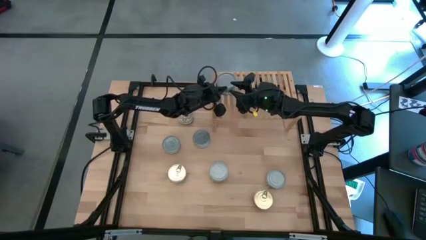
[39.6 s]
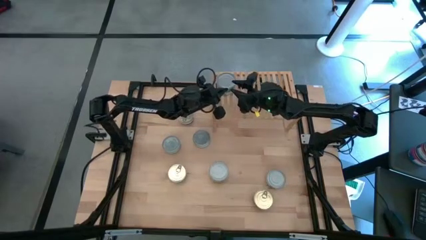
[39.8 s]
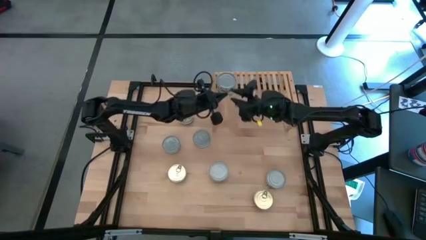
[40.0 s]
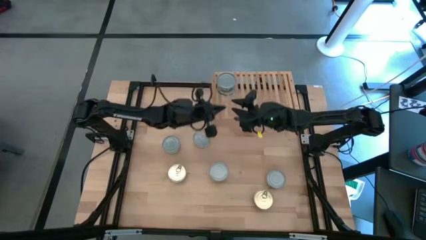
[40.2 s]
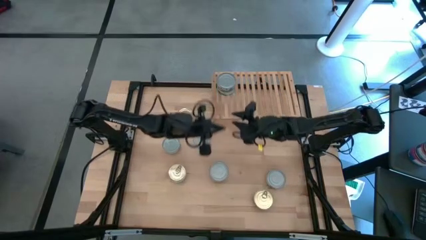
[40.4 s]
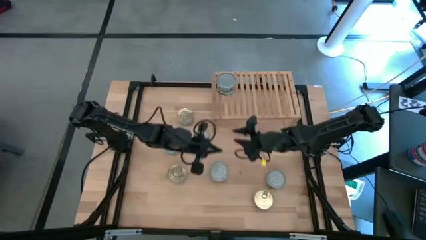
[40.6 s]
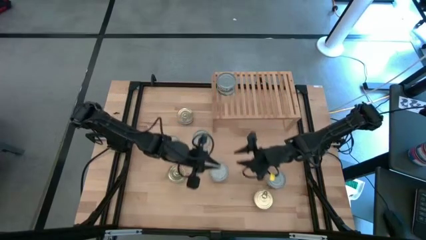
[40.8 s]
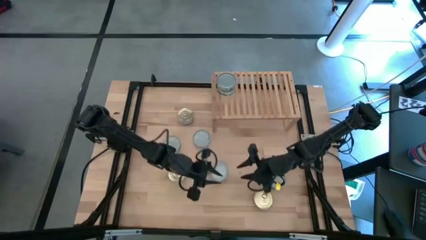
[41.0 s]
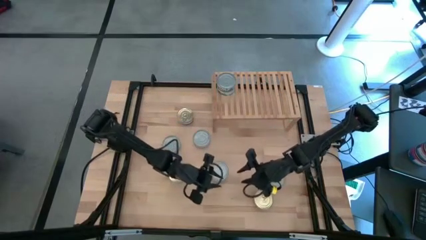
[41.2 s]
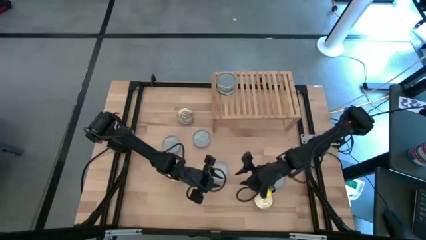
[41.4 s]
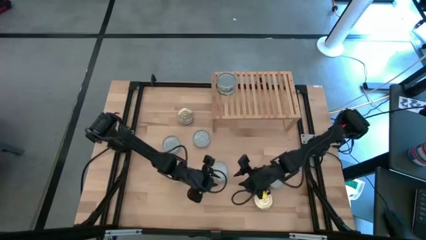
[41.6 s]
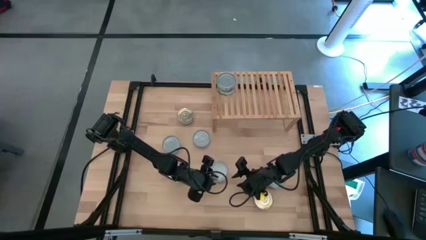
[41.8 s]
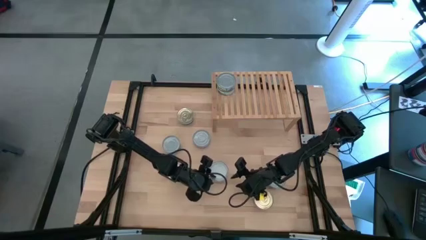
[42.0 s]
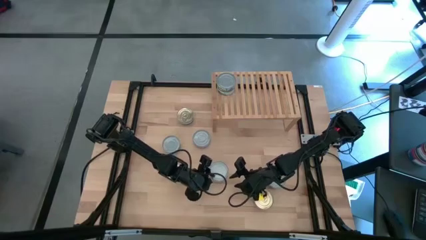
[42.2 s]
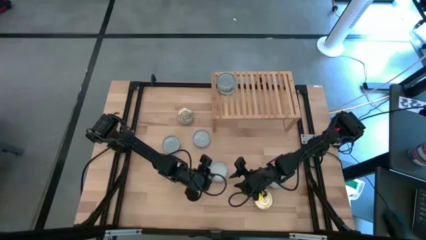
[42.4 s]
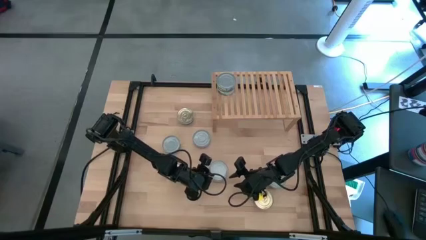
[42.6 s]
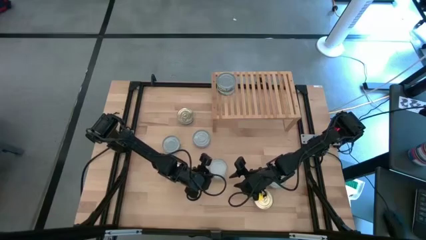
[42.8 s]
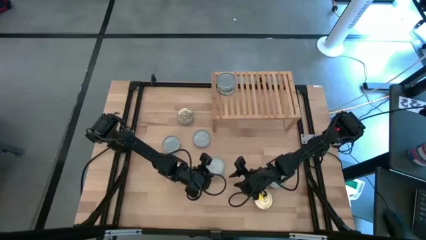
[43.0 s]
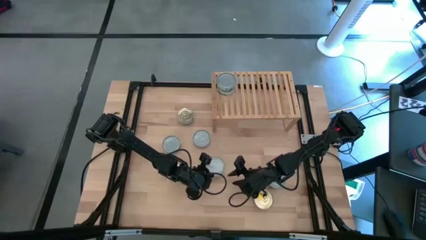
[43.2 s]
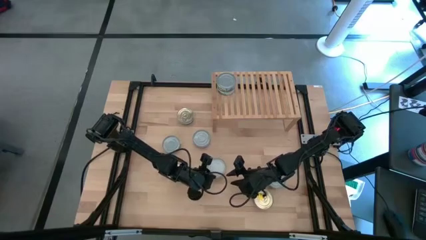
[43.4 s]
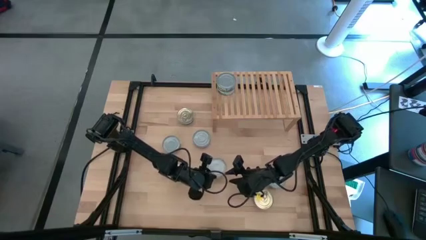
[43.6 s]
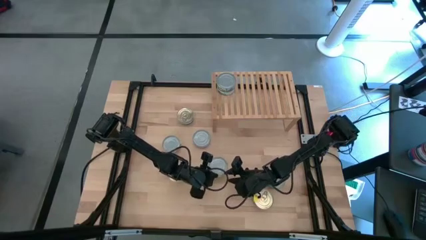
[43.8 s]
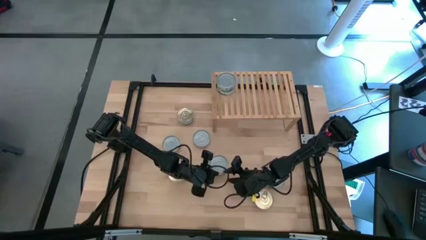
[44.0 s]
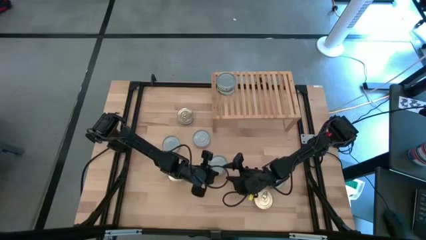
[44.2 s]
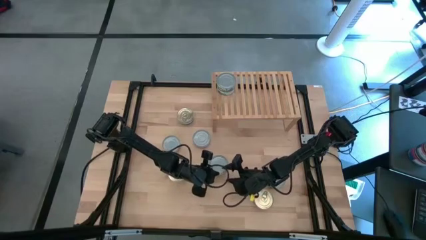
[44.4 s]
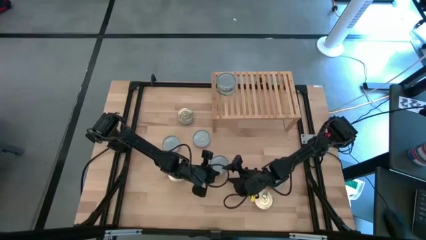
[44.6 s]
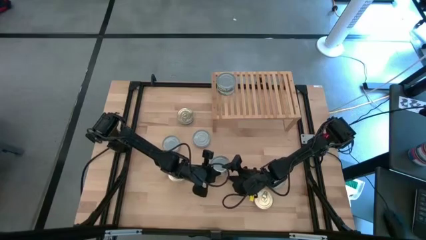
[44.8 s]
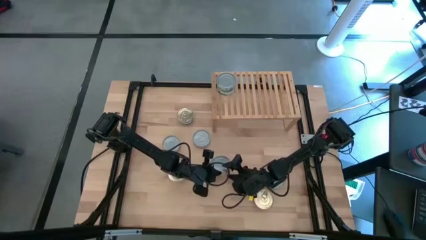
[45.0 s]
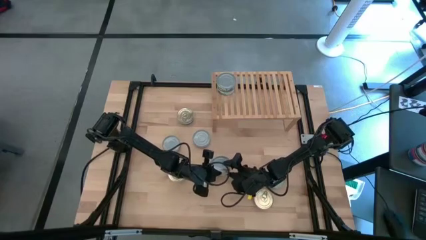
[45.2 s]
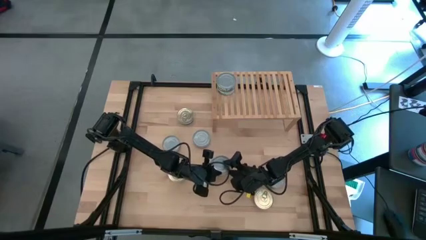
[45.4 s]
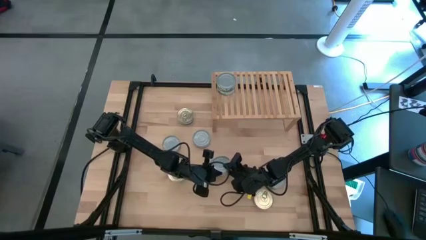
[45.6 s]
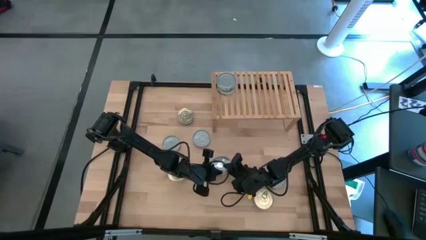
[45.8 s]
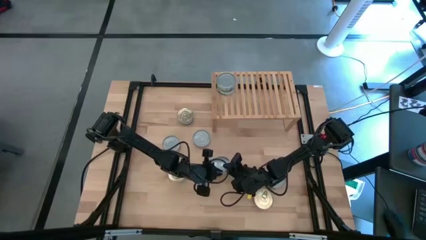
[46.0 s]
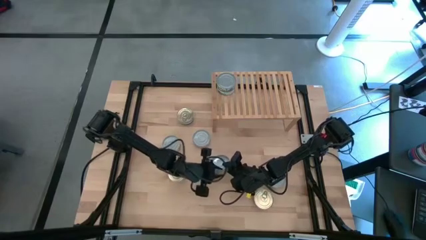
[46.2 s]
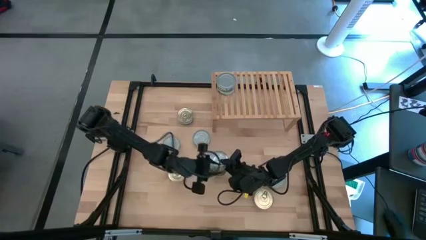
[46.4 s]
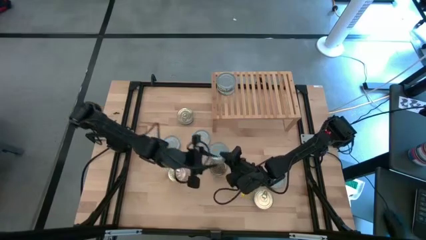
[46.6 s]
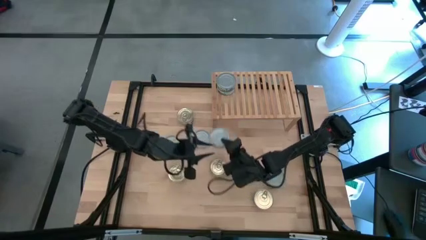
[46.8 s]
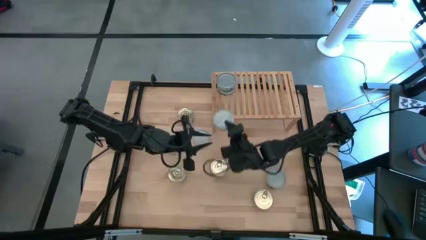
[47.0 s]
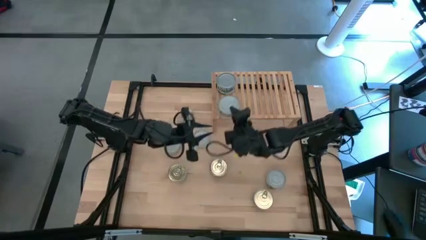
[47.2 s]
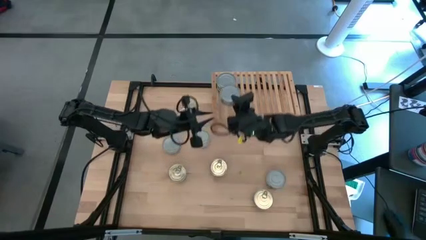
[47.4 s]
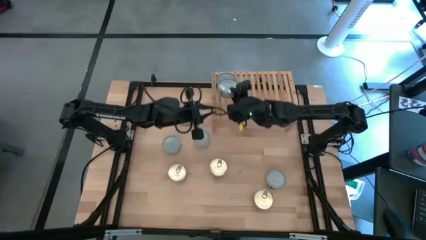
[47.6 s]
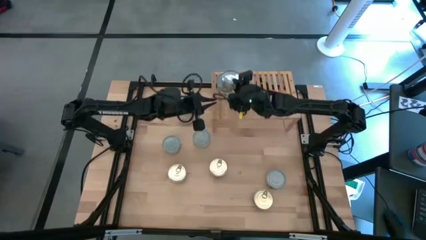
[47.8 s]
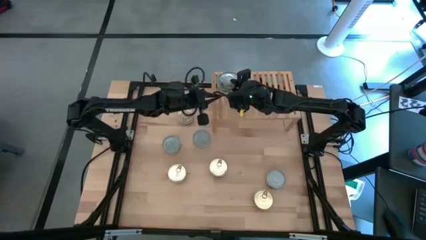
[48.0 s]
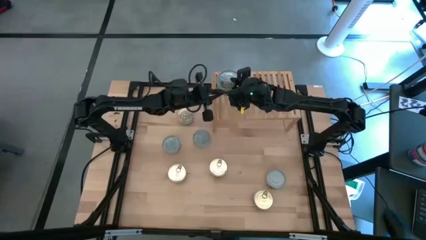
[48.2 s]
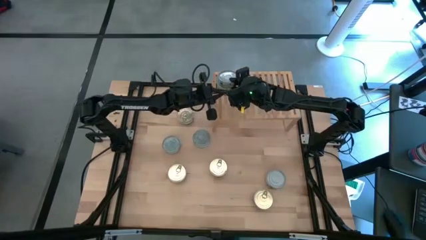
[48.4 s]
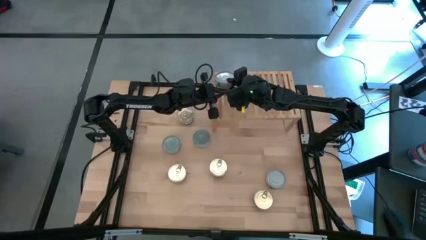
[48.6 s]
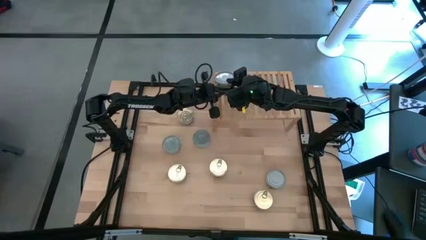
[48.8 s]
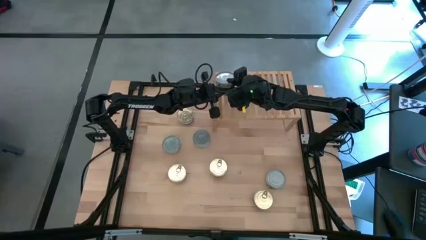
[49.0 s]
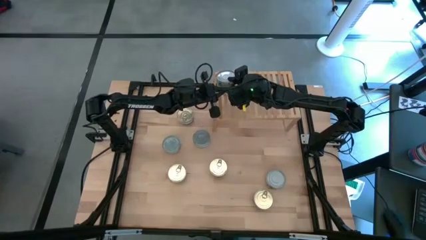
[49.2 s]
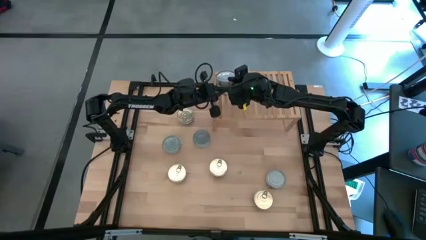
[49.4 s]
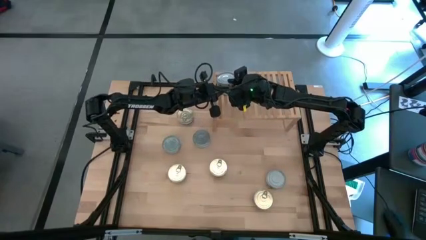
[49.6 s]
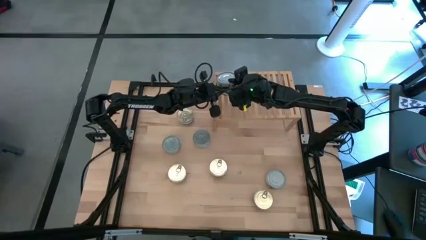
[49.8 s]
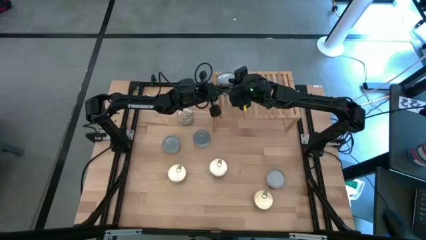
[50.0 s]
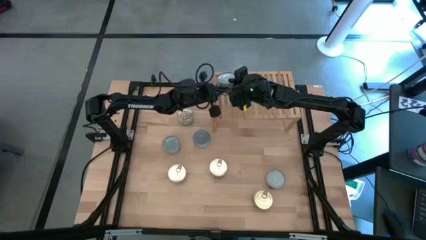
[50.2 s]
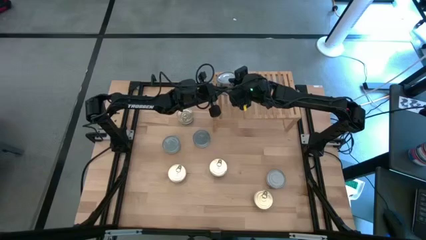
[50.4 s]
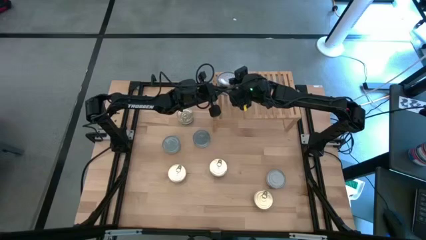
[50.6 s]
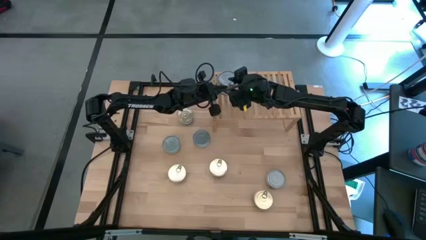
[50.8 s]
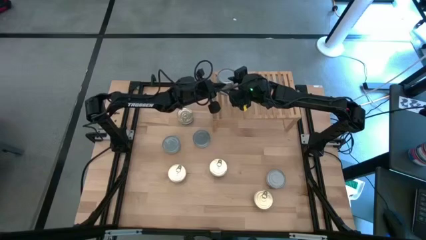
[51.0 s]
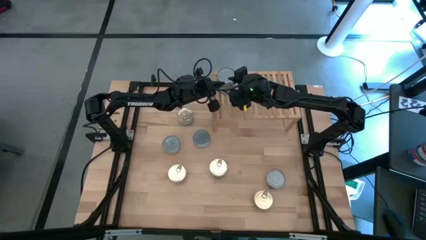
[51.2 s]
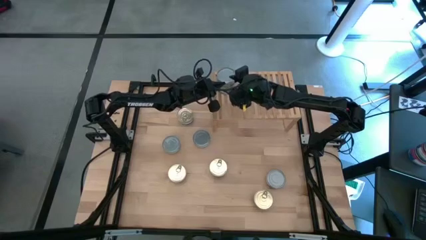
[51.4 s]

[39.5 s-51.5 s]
Task: Stack canned seafood by type on shelf
Stack the green tuna can on top of the green tuna cans on the shelf
